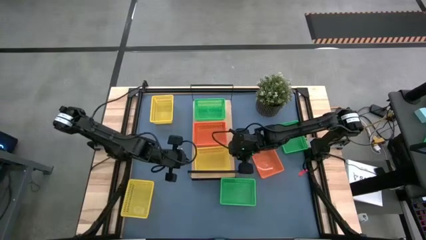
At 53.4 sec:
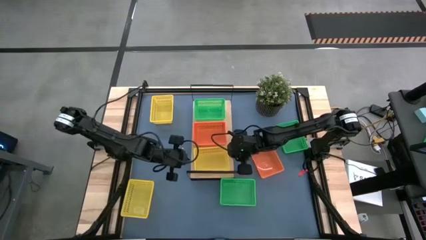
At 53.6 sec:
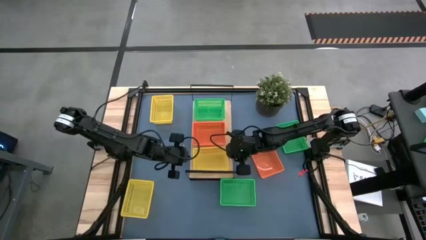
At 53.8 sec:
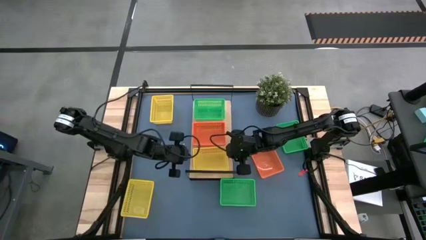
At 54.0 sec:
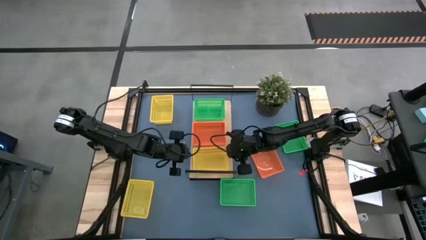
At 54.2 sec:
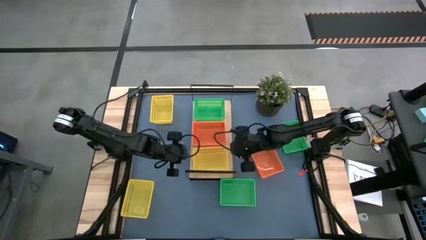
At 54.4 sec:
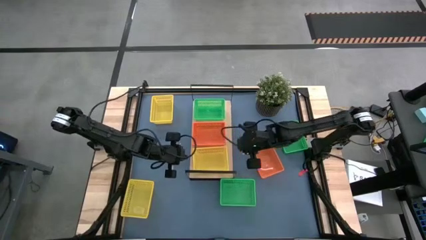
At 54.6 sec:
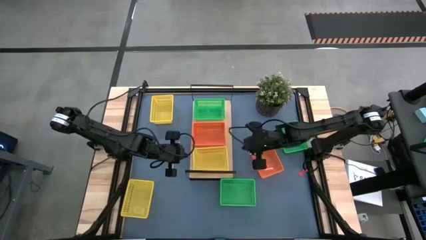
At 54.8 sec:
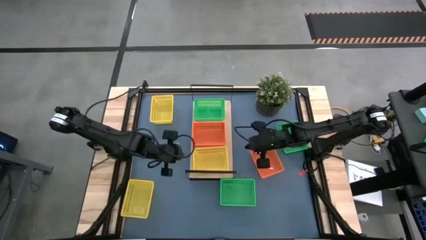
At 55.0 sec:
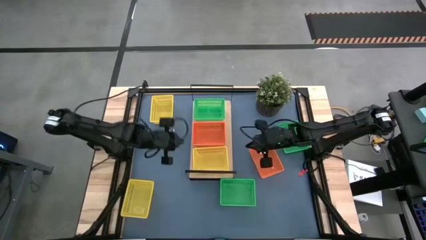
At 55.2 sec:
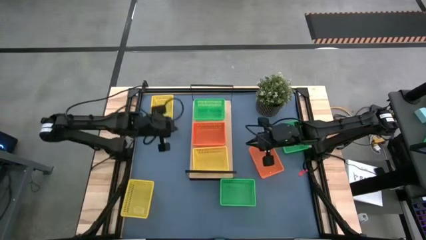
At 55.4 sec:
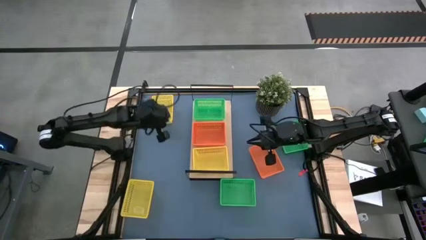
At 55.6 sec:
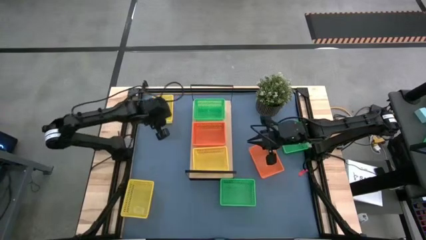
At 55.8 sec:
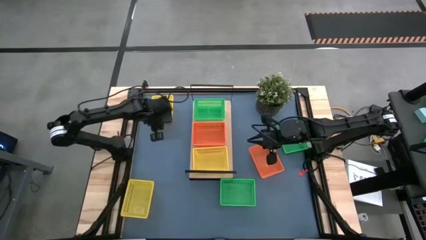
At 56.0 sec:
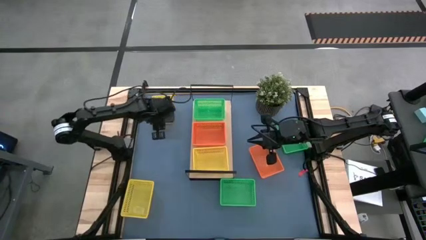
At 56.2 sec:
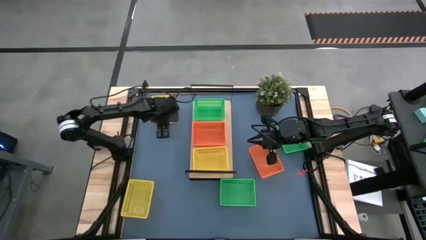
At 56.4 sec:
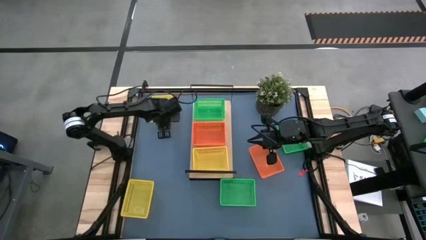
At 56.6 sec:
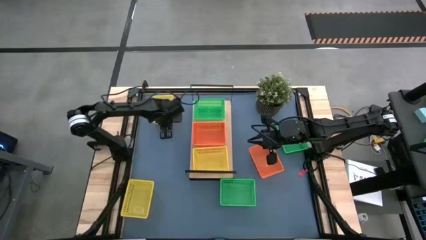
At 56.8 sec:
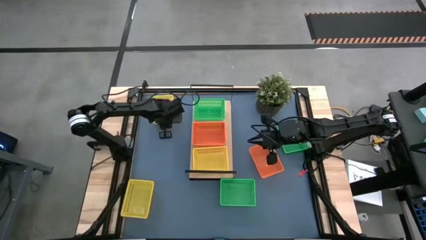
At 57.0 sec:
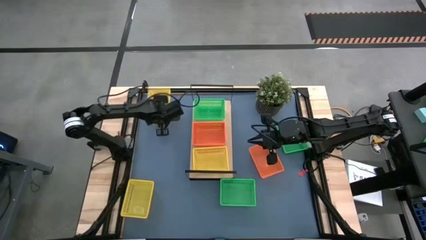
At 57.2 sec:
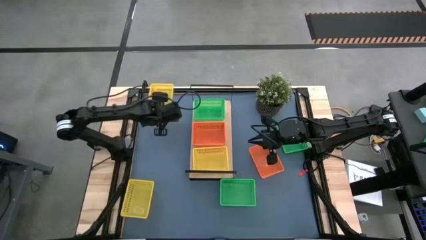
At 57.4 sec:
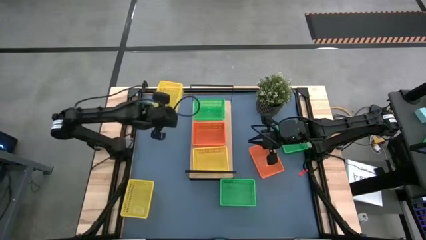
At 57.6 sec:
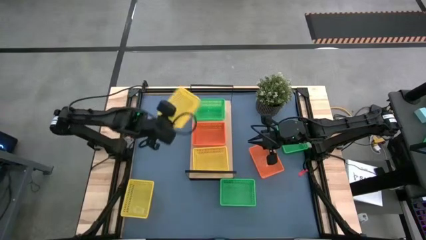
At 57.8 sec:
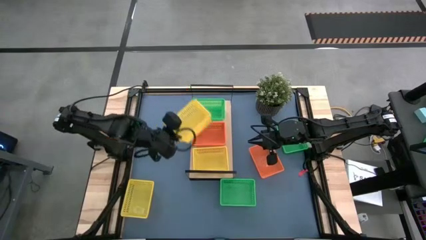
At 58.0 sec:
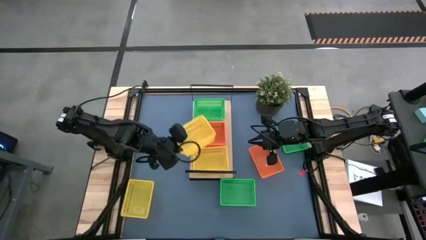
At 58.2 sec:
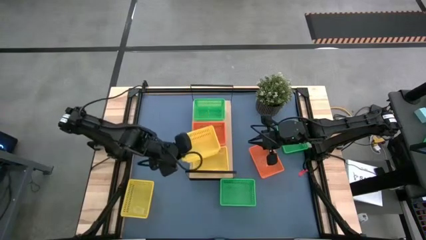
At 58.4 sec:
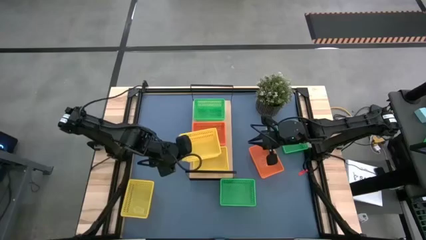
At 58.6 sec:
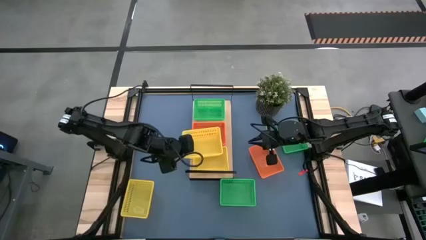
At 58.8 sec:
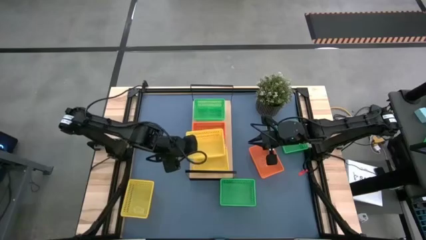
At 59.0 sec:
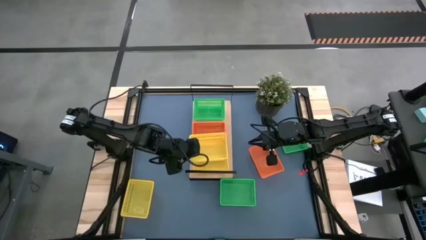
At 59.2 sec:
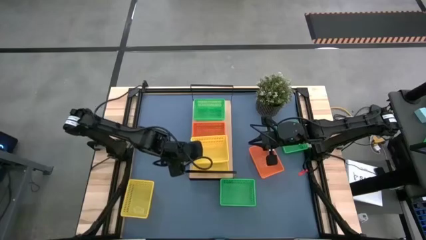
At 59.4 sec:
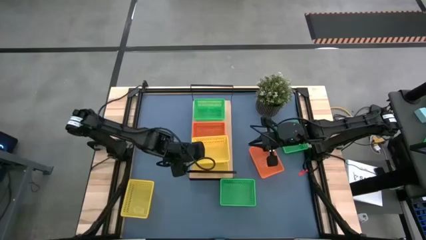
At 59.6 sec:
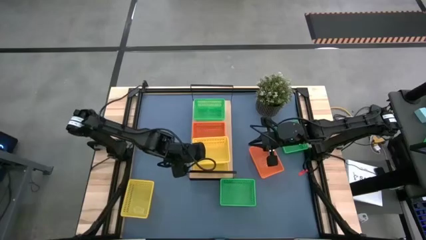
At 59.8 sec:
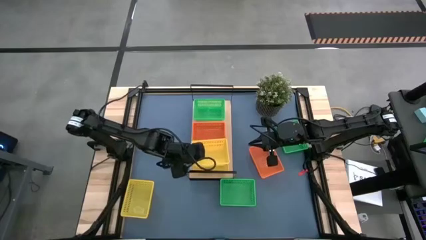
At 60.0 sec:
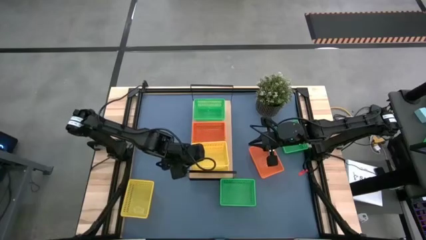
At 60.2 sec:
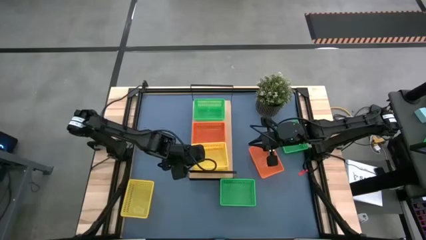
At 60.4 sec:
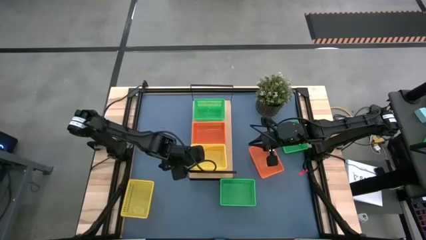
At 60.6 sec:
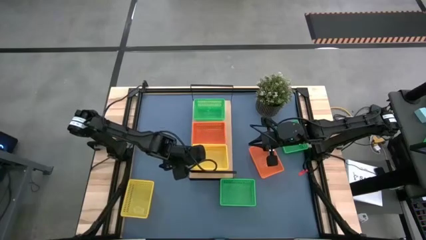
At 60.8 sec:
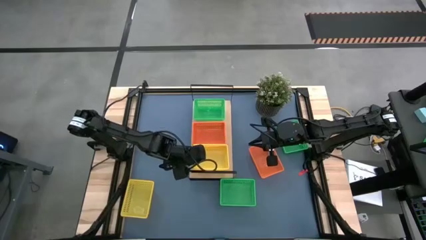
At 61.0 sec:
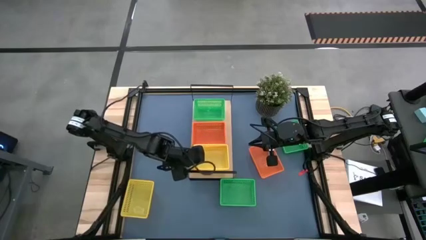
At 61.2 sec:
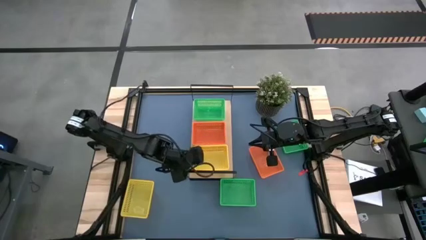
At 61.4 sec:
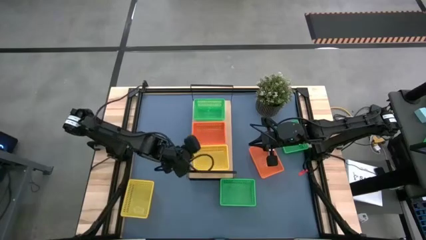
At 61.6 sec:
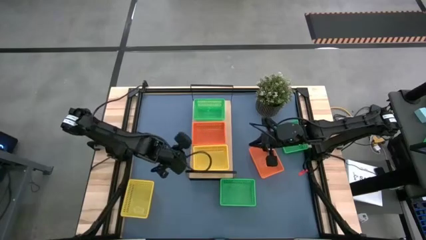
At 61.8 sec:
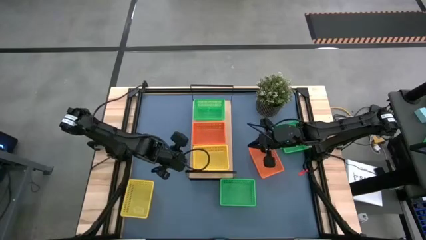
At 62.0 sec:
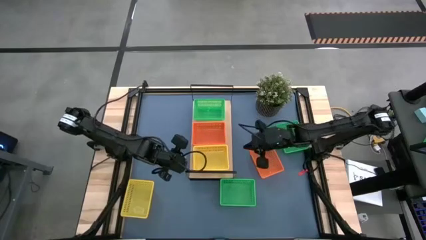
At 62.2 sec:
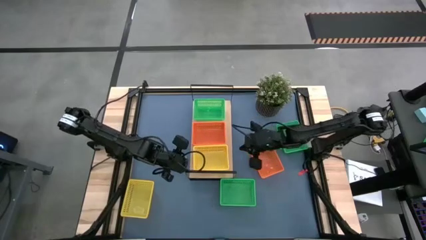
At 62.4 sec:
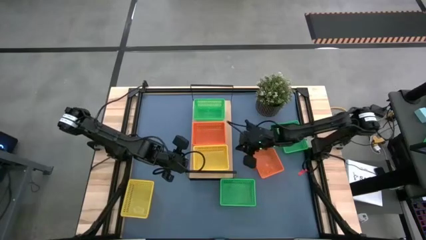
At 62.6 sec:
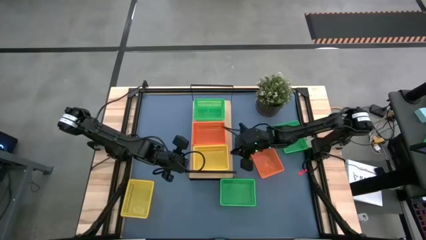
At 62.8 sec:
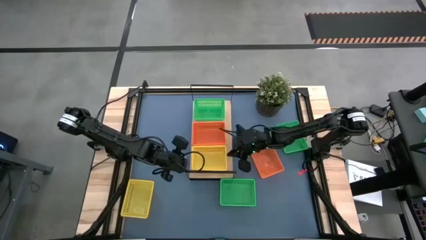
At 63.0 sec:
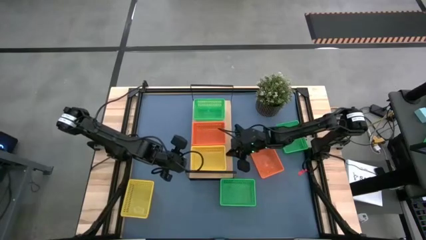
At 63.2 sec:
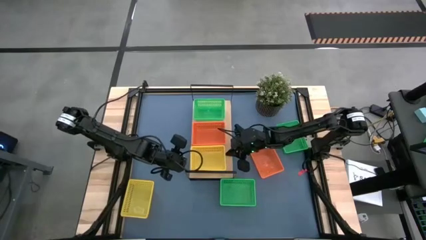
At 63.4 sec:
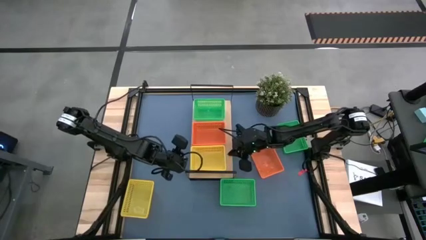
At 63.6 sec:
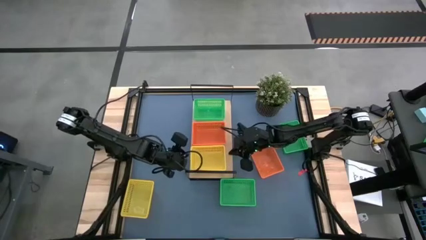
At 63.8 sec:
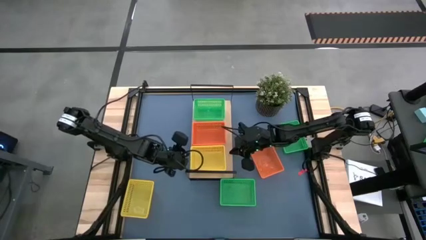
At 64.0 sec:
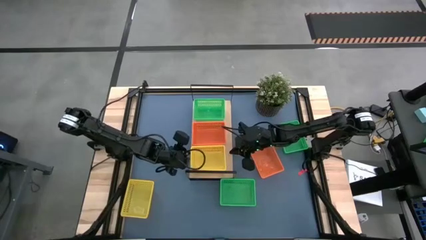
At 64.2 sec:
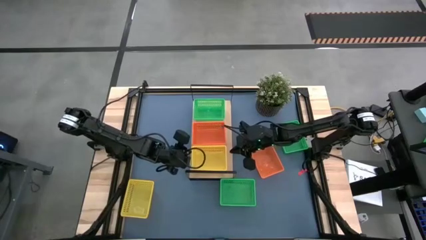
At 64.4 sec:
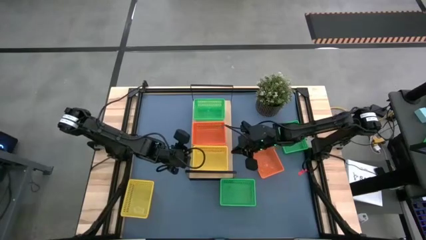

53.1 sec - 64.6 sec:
Task: Stack baskets on shelf by color
Stack the top yellow bin on top of the yellow bin on the shelf
